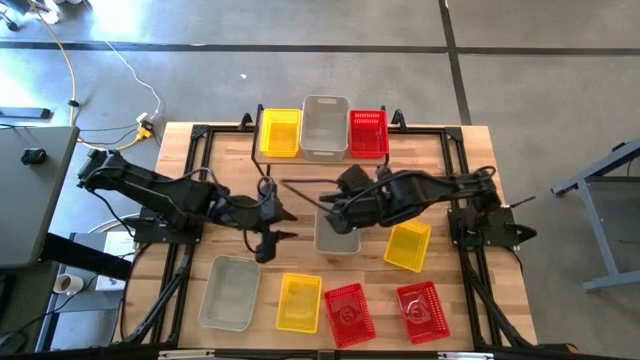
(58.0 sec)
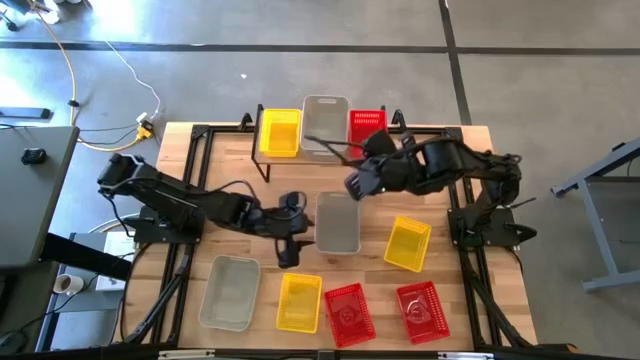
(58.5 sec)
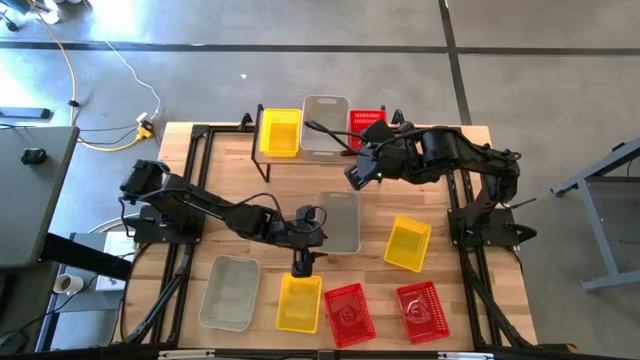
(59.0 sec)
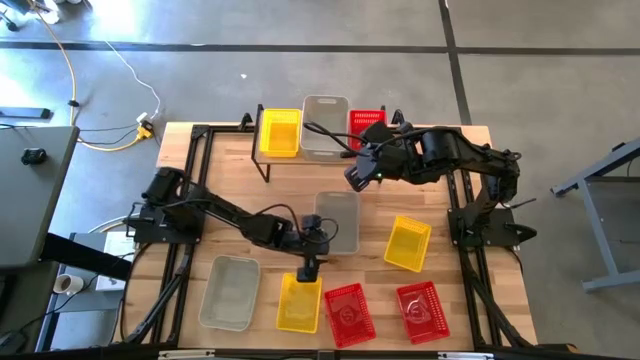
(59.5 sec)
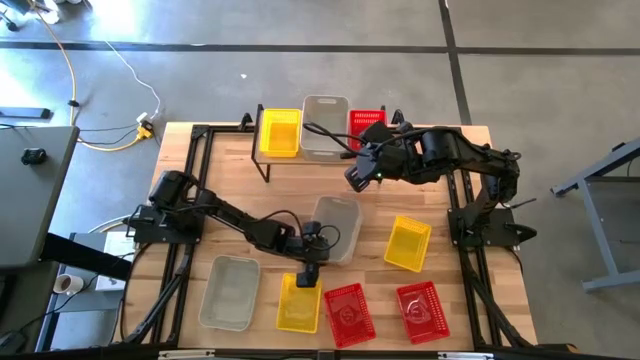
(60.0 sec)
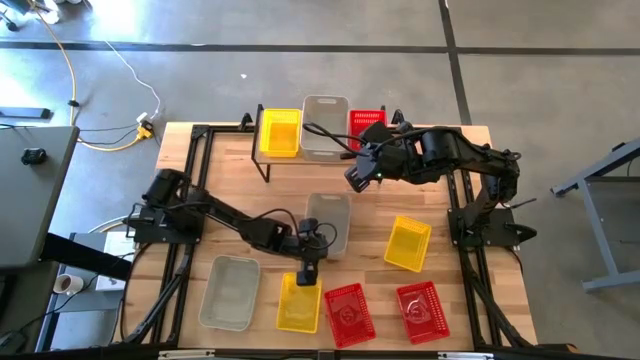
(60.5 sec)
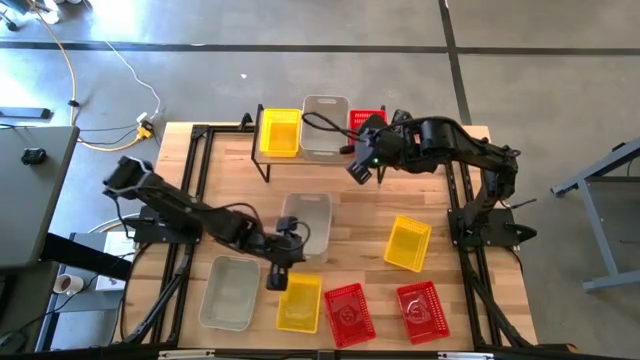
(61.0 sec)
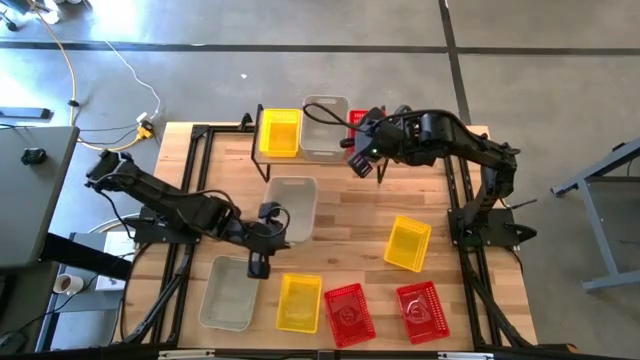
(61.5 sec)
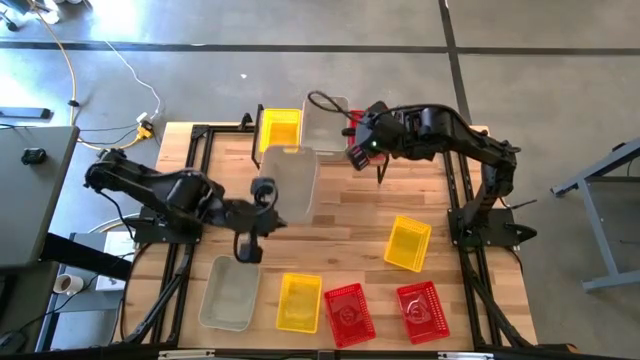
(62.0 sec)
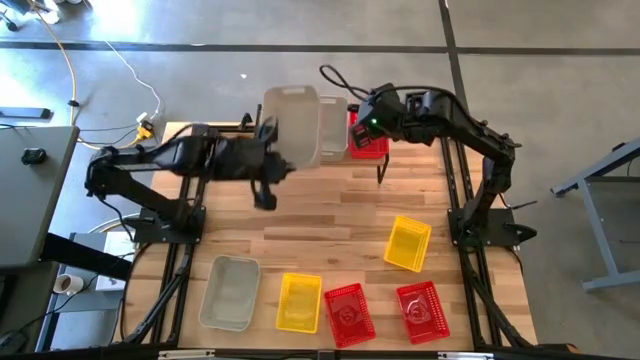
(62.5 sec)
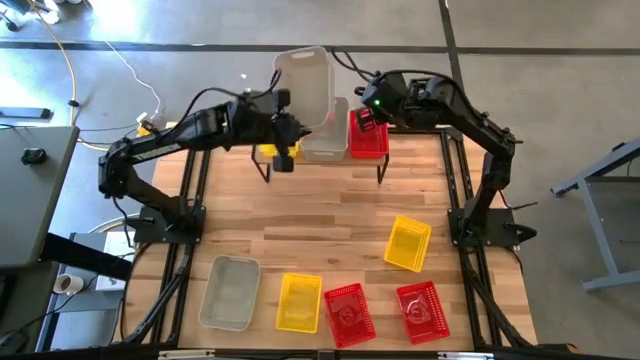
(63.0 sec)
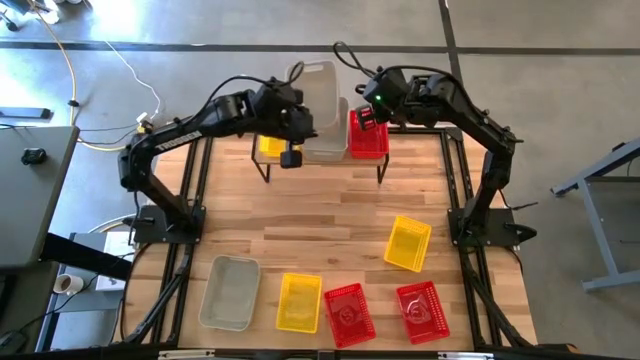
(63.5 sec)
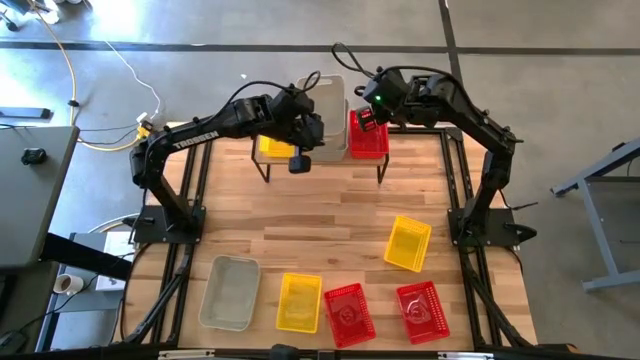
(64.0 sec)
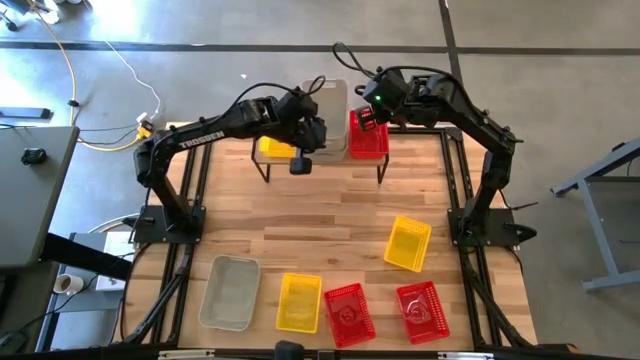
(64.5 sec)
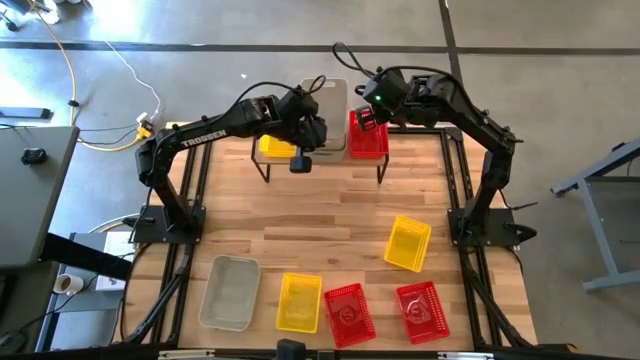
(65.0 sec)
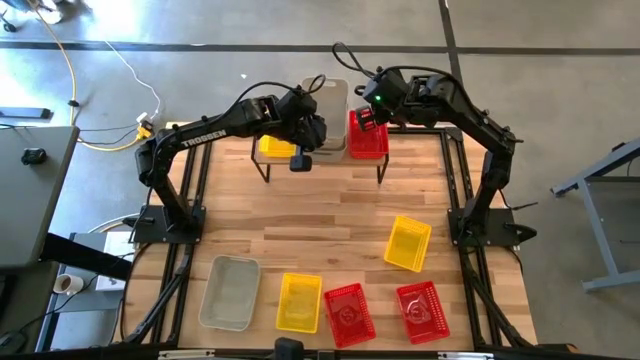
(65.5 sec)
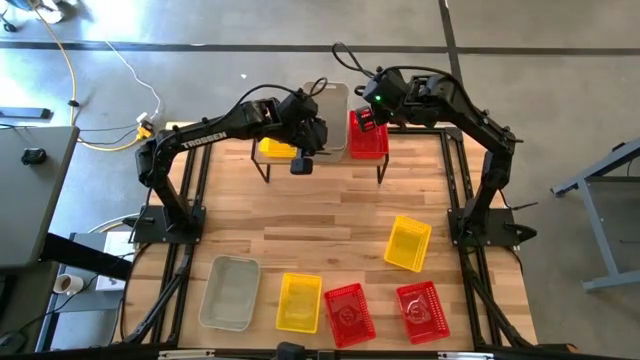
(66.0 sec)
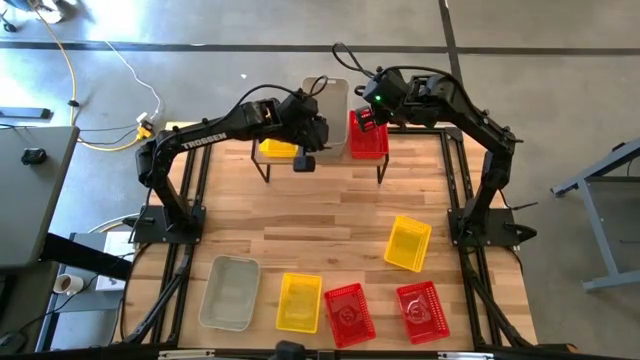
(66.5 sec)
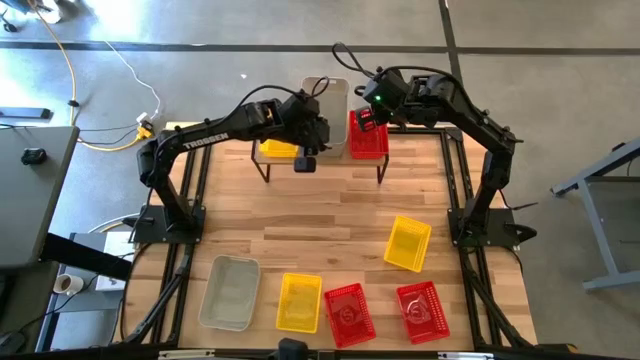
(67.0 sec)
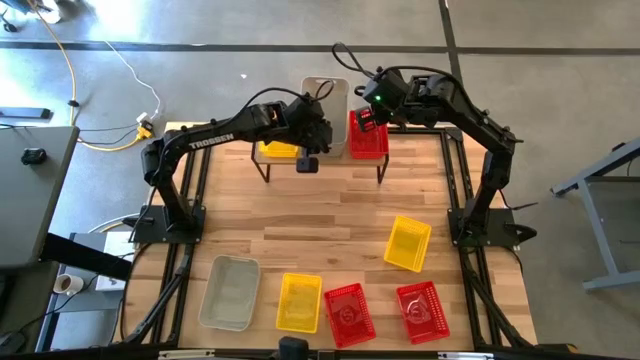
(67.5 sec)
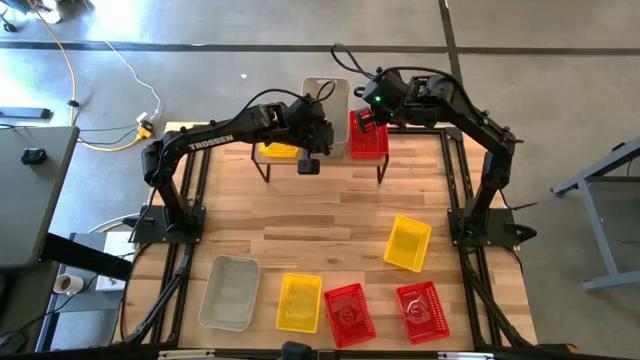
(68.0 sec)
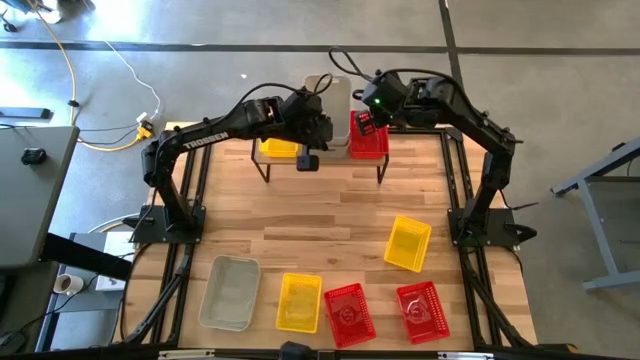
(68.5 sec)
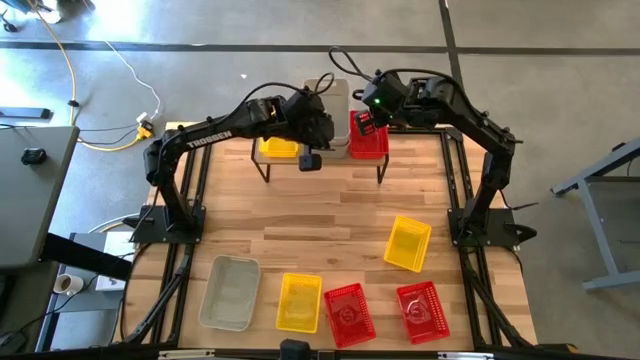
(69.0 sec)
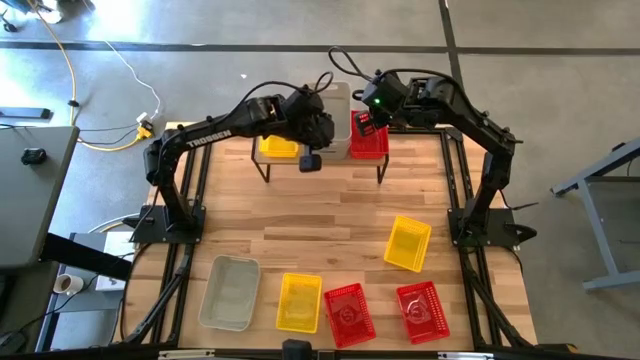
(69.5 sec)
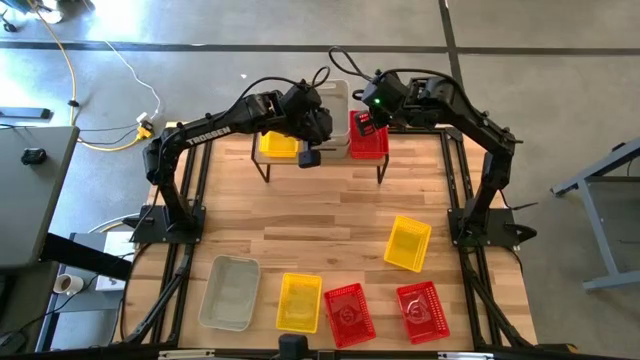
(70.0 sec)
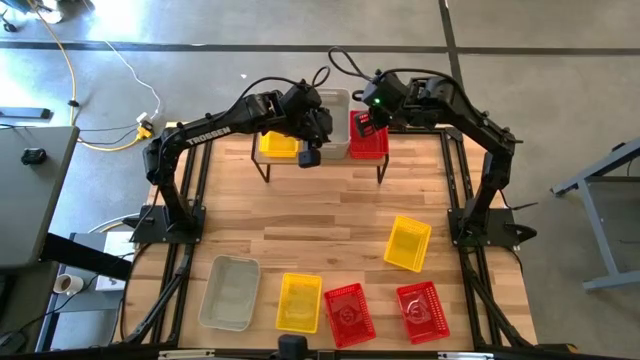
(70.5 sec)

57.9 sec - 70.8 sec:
Task: Stack baskets on shelf by color
Stack the top gray bin on top of the gray bin on the shelf

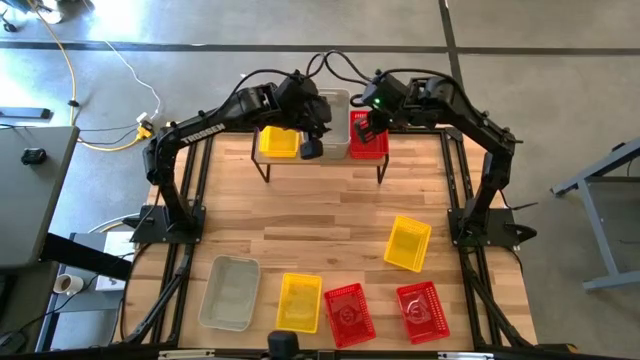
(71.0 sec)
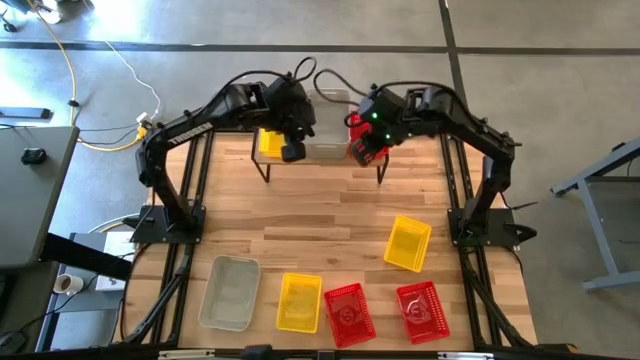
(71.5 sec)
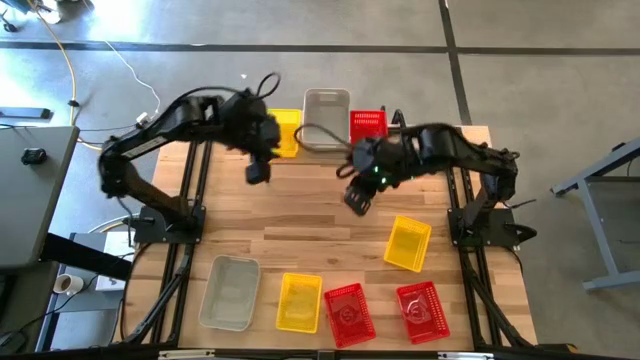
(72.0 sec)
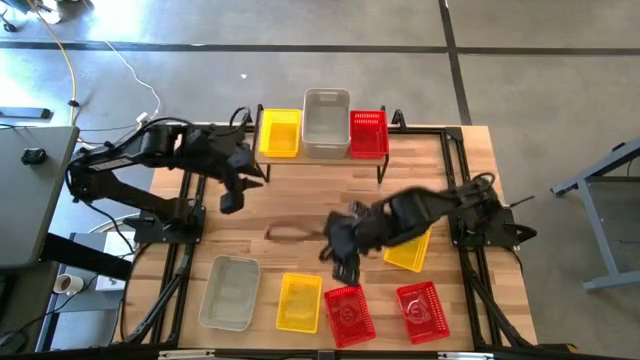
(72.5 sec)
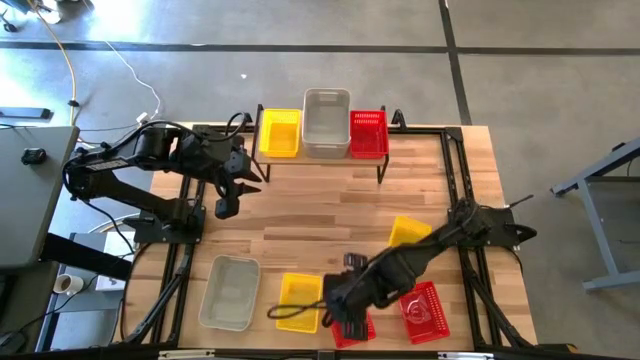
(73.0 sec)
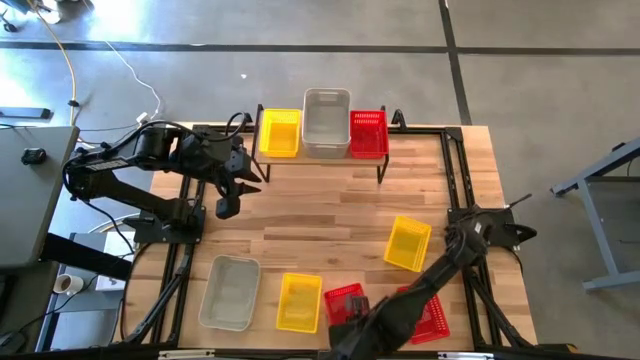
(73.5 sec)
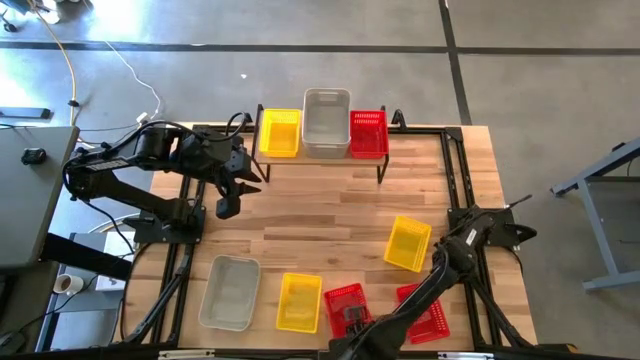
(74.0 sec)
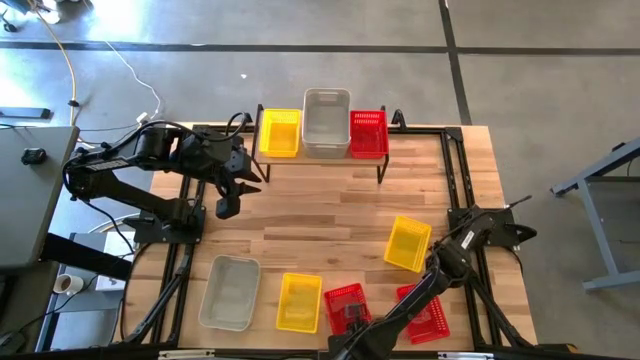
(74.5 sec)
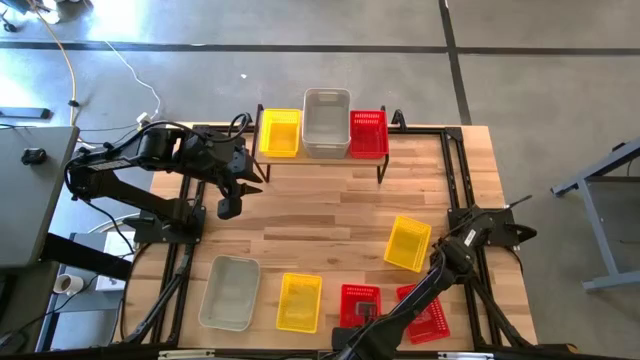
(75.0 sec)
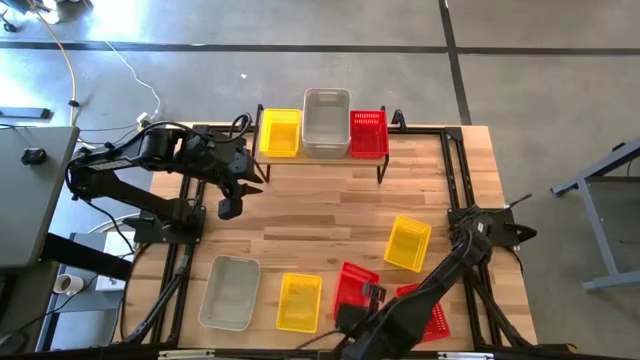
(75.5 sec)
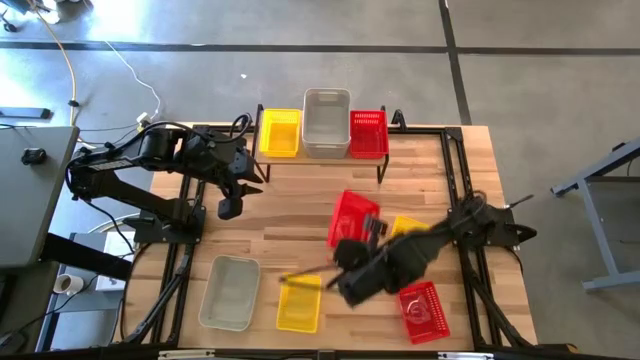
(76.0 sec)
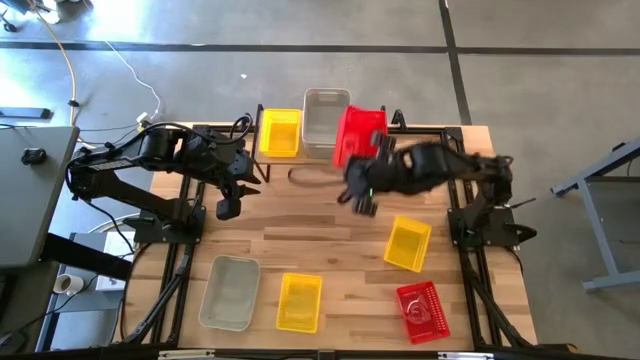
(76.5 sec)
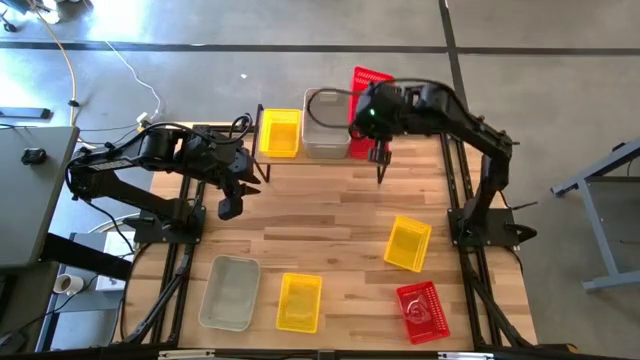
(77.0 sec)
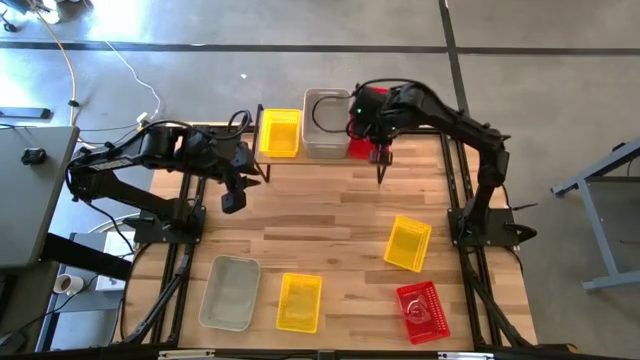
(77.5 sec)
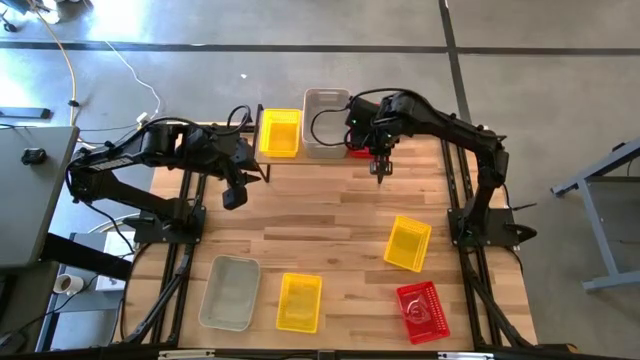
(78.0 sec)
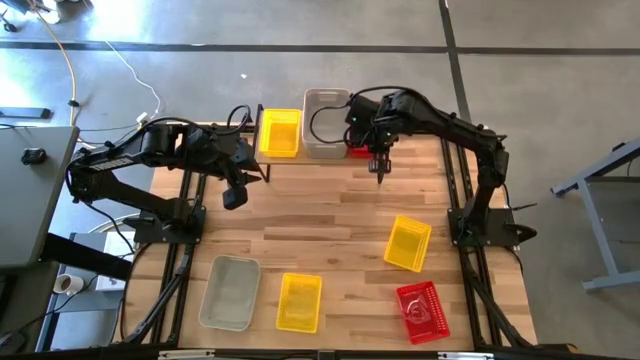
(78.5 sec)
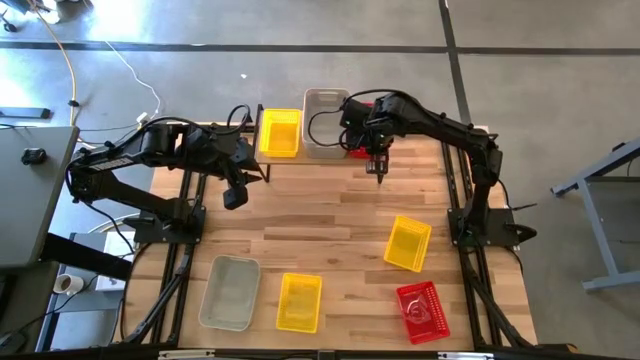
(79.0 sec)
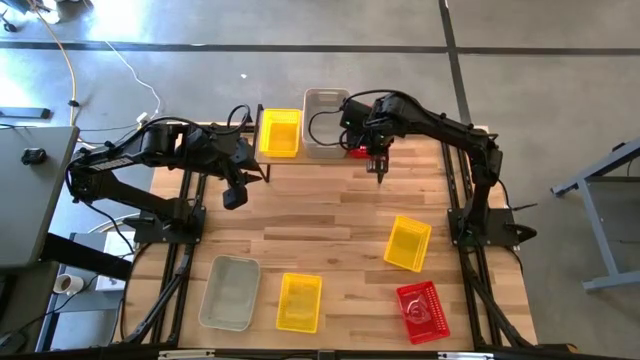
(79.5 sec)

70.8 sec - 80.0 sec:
Stack the left red bin on top of the red bin on the shelf
